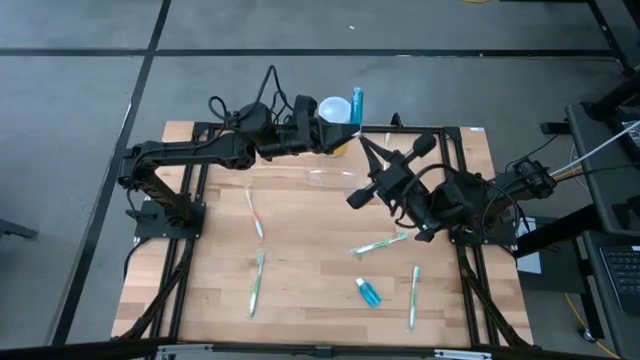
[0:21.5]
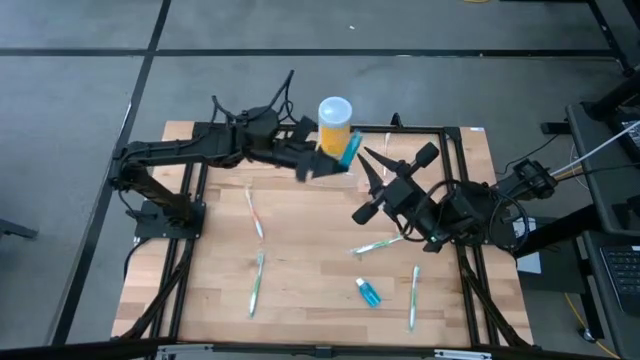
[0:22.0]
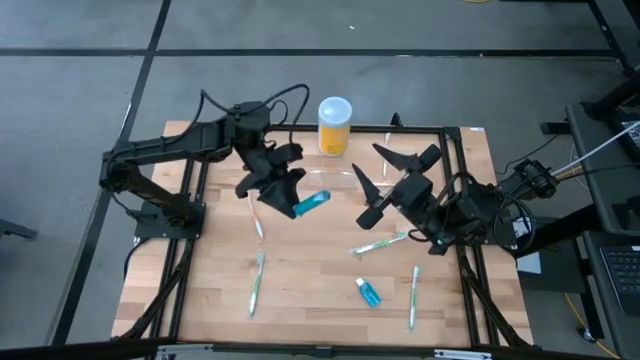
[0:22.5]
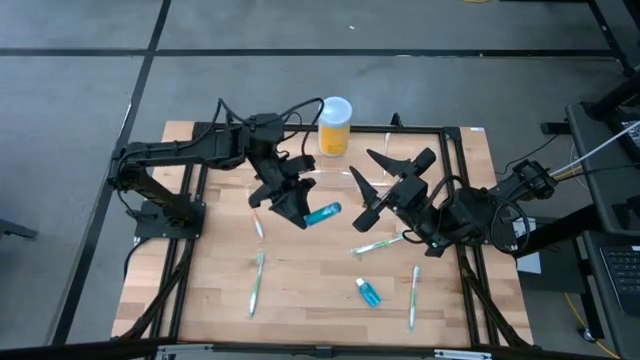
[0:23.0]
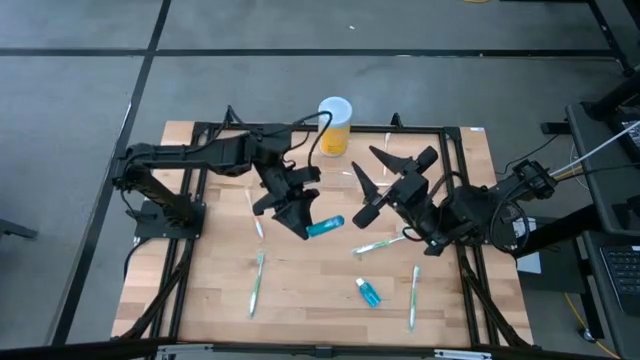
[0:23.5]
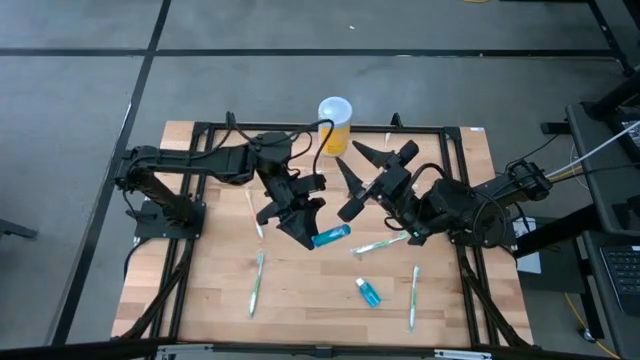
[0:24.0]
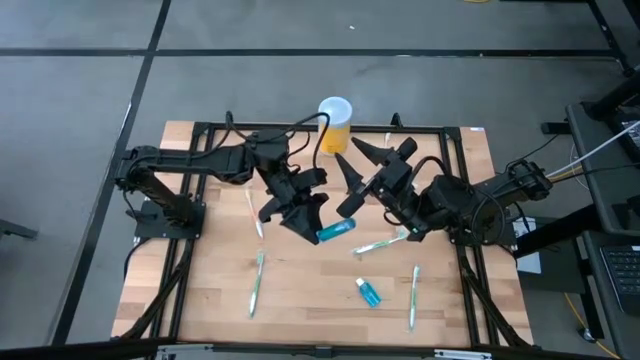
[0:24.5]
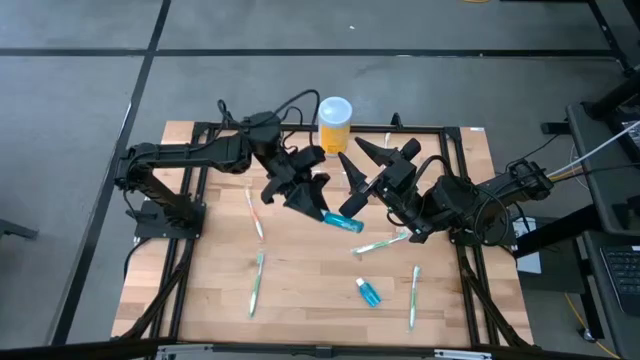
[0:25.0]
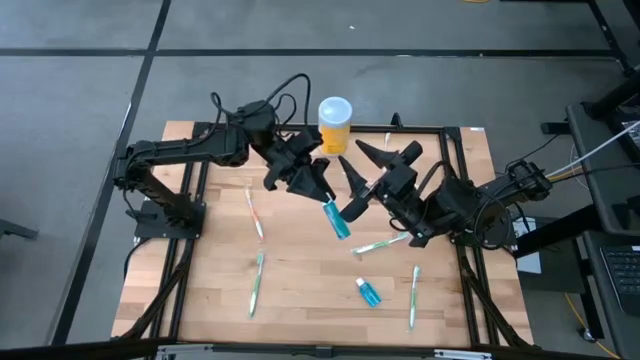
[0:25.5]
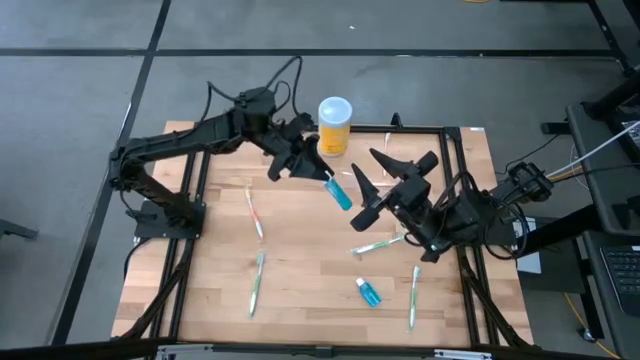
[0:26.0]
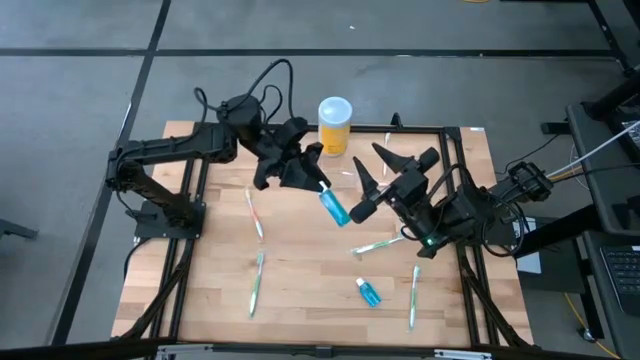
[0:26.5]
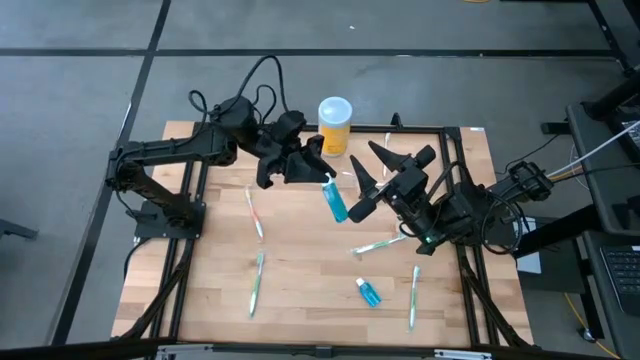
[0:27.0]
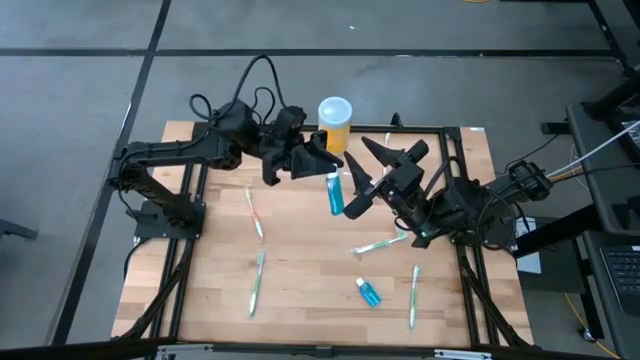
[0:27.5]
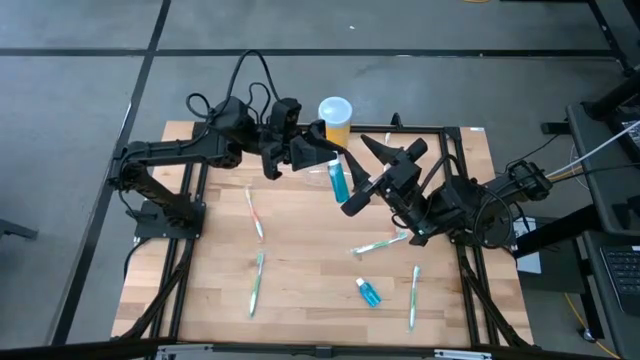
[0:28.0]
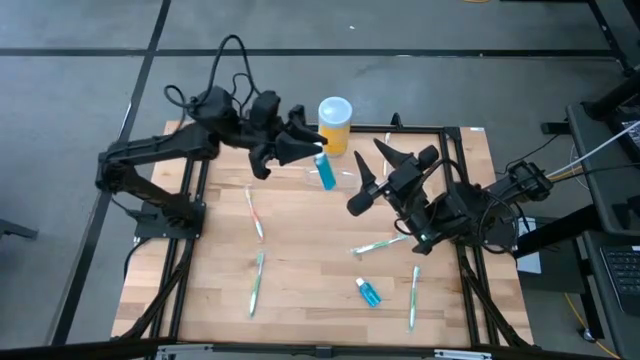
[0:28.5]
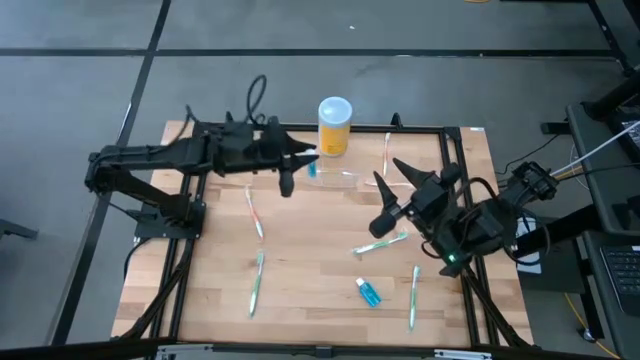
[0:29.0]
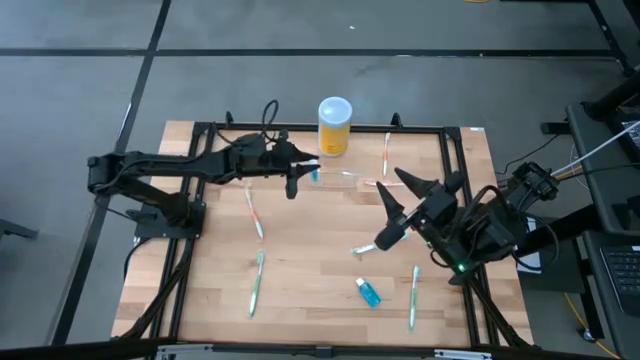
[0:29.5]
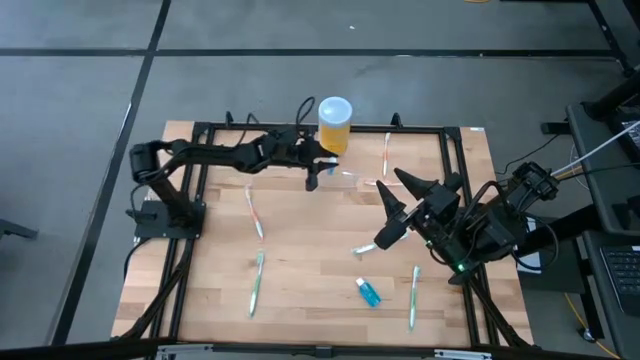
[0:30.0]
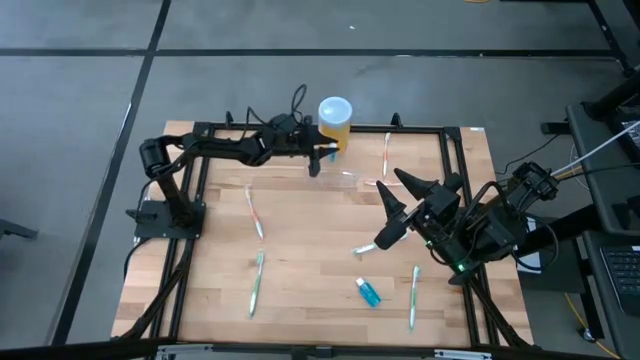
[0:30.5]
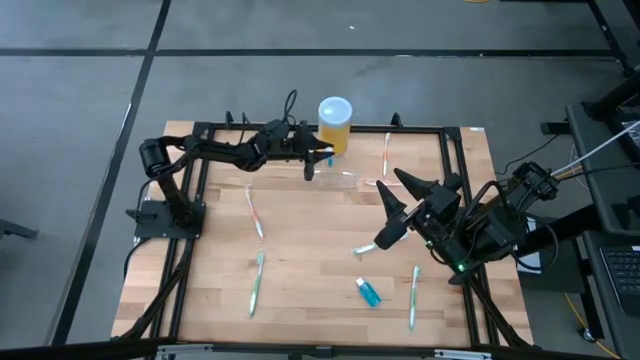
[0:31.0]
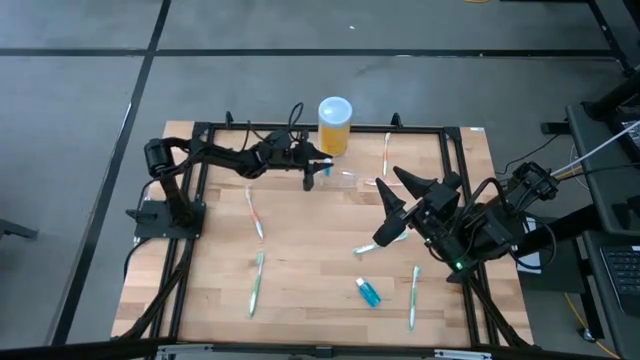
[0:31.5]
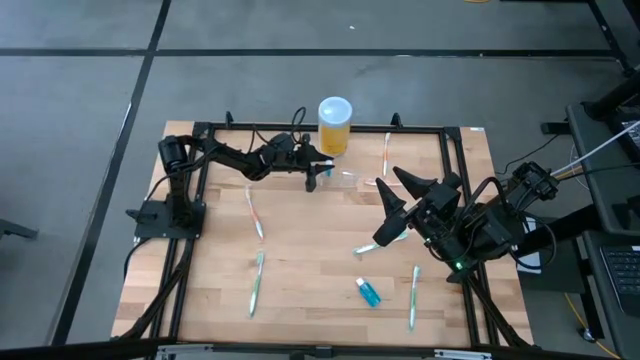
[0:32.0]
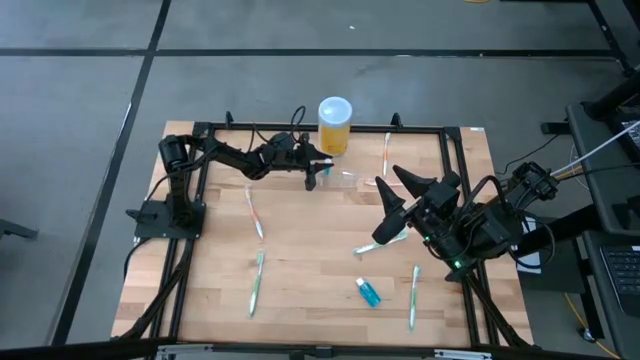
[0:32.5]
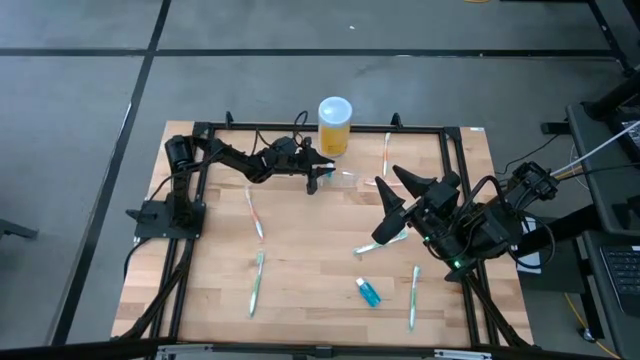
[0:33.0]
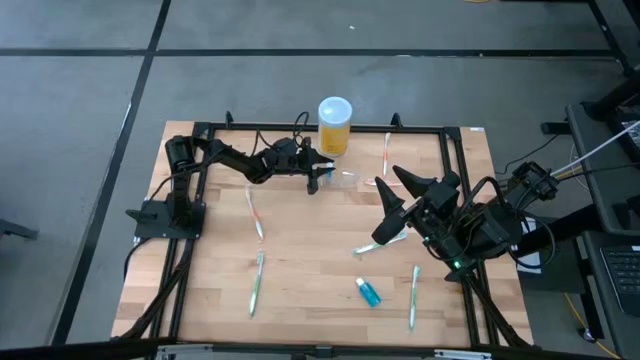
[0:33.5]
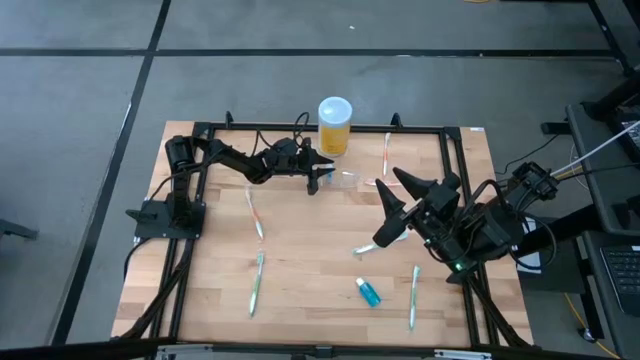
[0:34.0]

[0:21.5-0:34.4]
Task: Pick & Place toothbrushing station
Put the top blue mouthwash into the transparent organizer

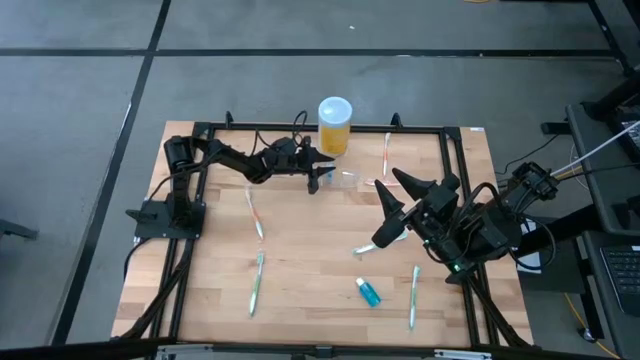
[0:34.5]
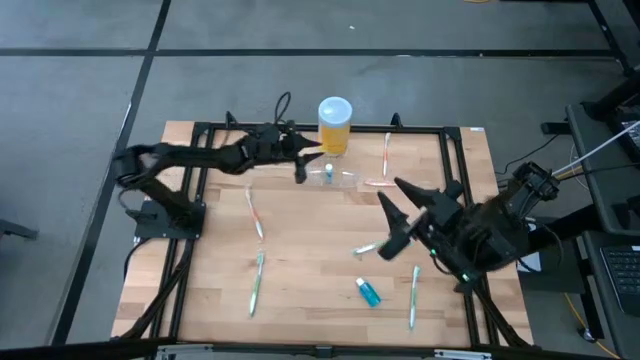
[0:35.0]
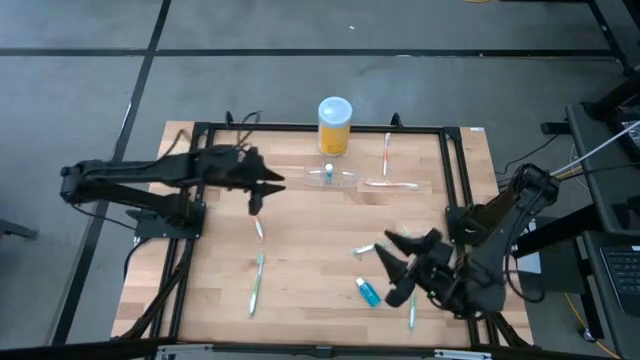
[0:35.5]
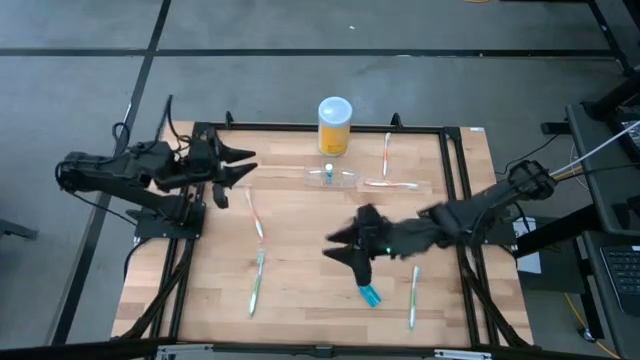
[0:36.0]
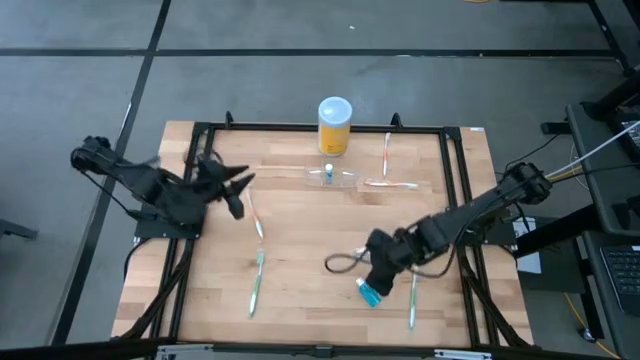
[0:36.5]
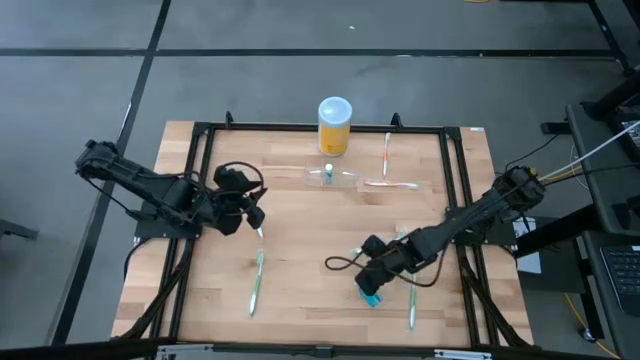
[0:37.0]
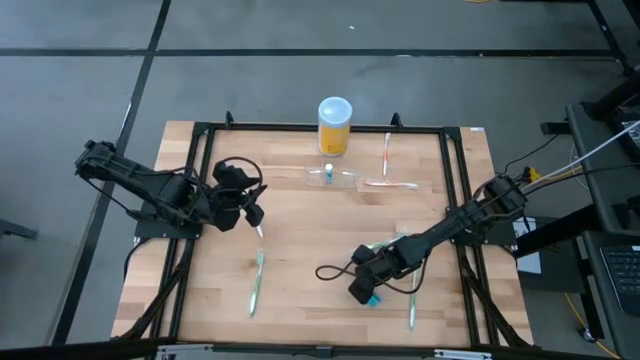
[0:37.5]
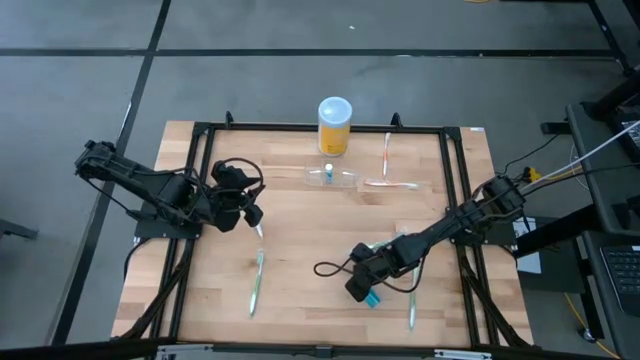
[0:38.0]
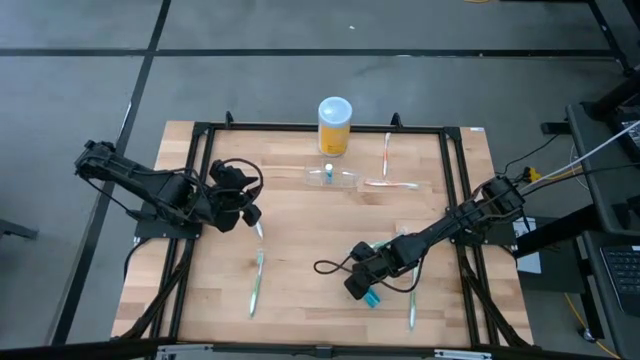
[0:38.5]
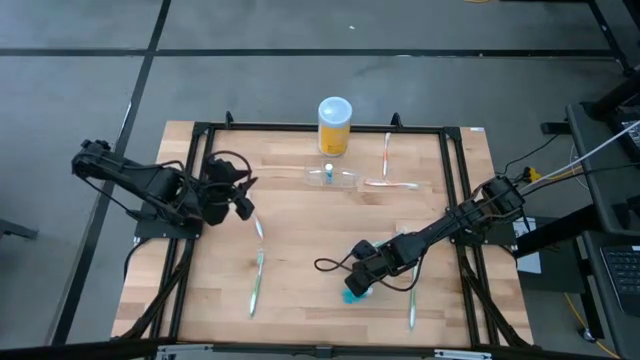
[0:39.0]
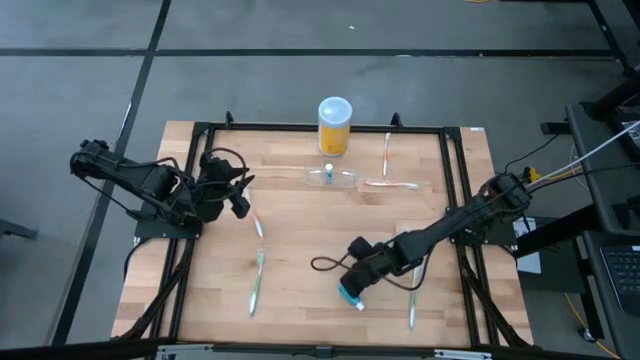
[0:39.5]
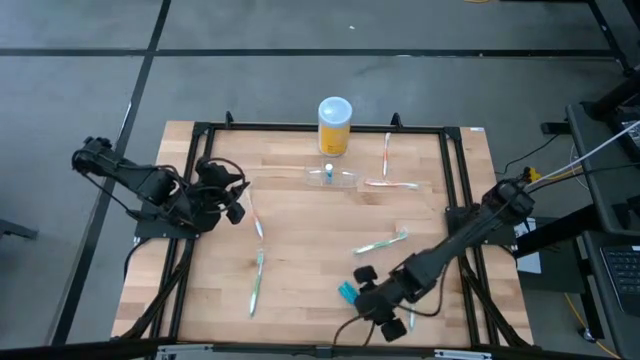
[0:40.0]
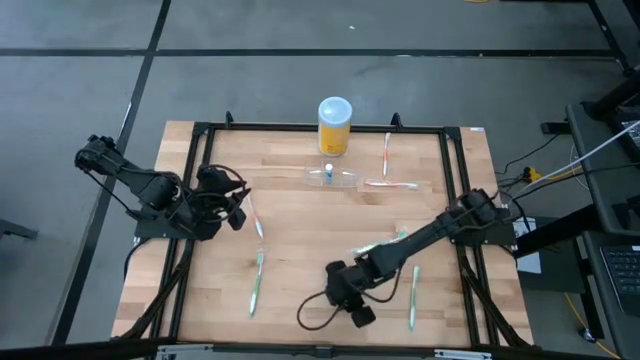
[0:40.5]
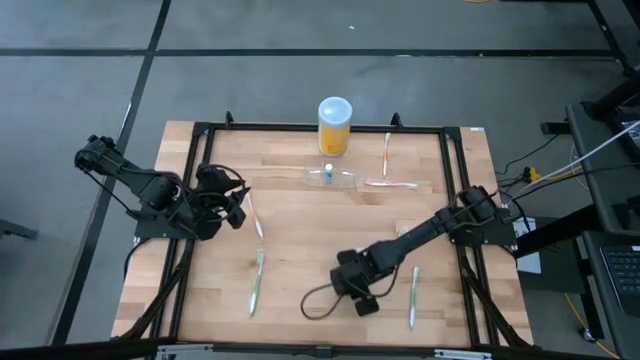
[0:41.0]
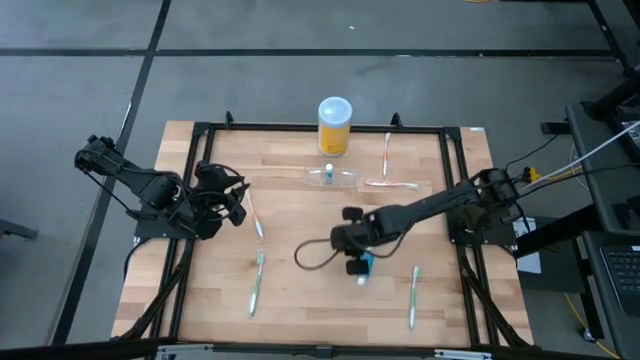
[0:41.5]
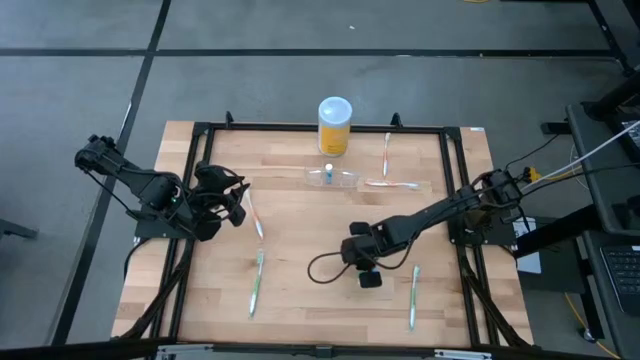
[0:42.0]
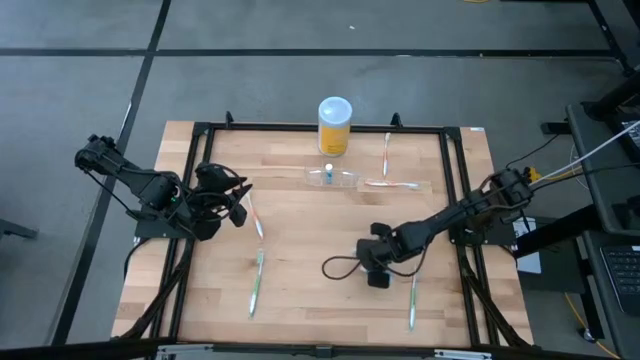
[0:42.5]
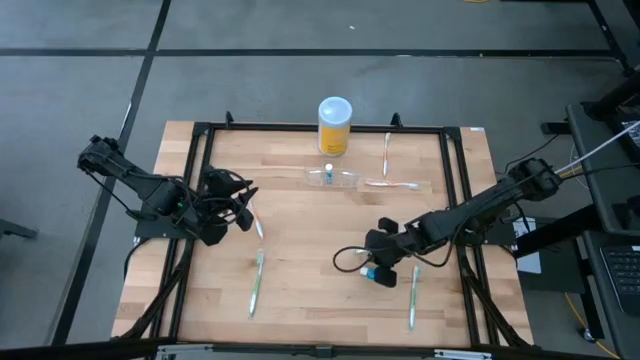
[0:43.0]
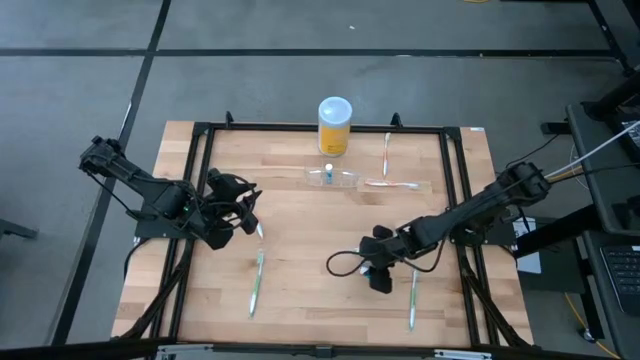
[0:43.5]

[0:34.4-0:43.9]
Put the blue mouthwash into the transparent organizer
